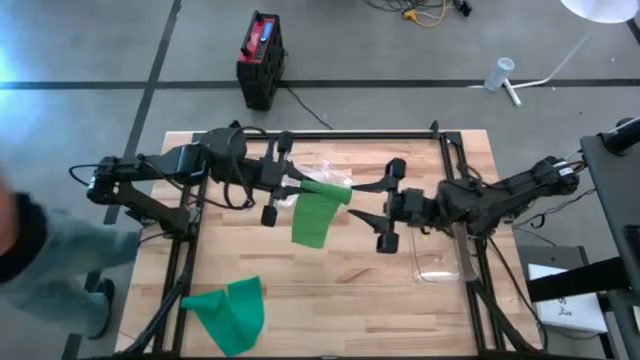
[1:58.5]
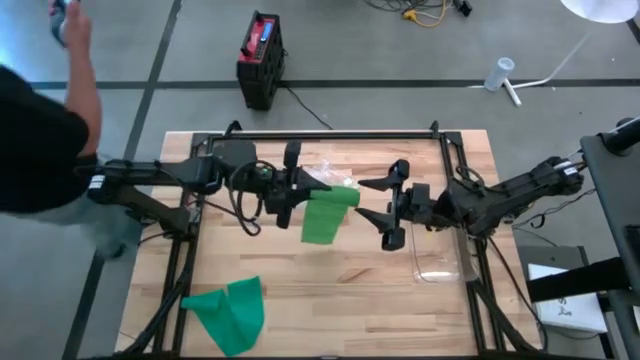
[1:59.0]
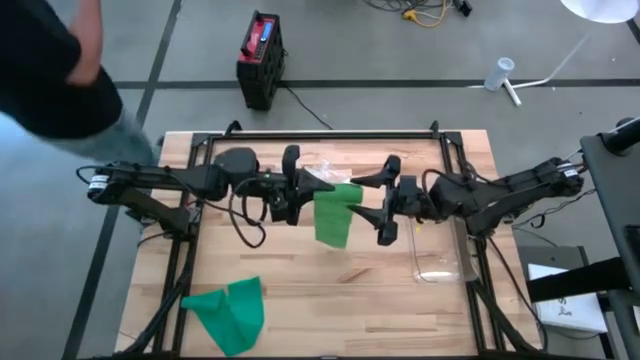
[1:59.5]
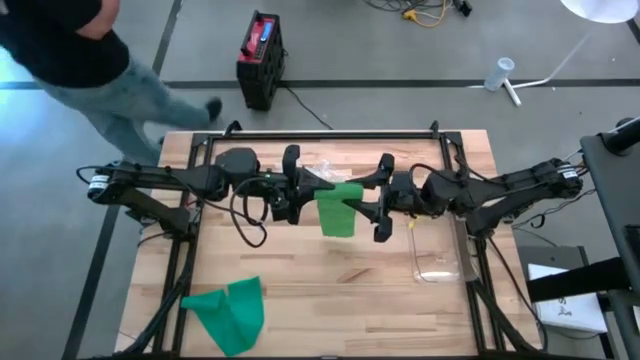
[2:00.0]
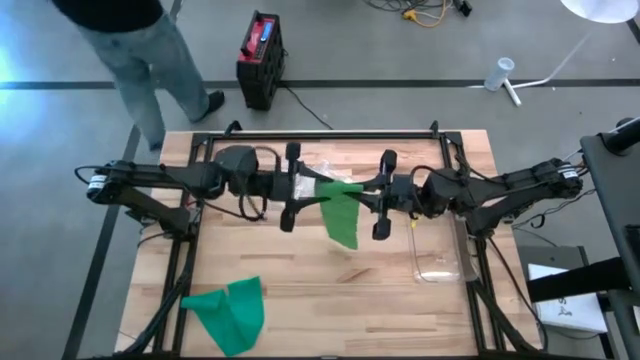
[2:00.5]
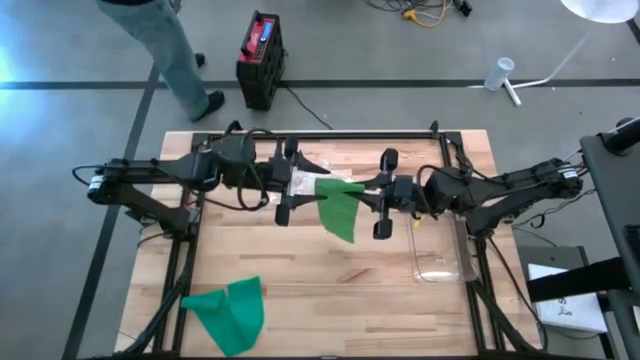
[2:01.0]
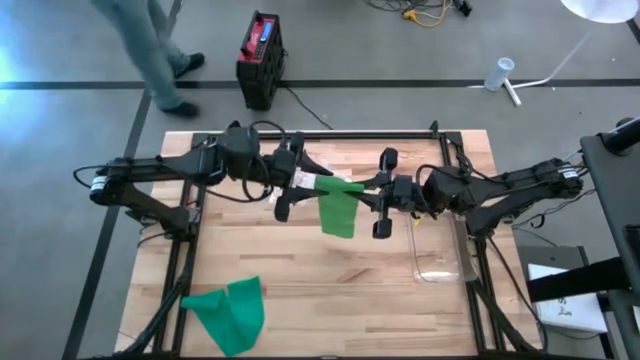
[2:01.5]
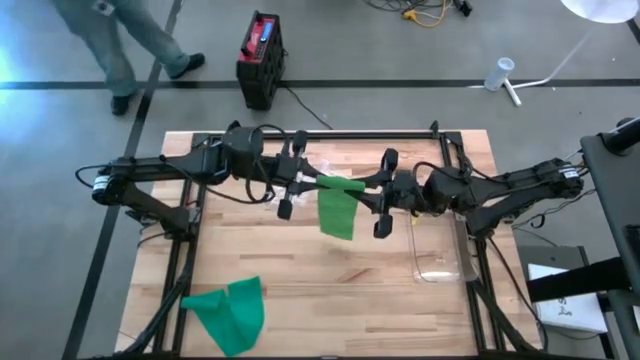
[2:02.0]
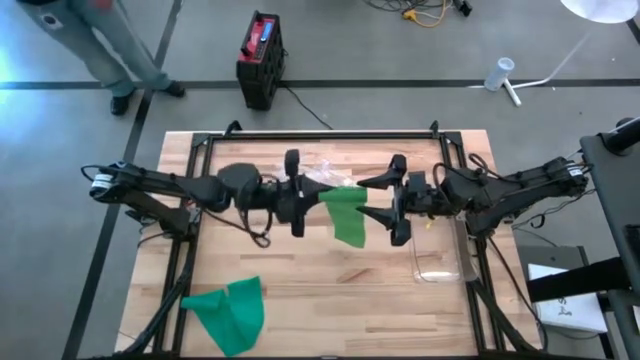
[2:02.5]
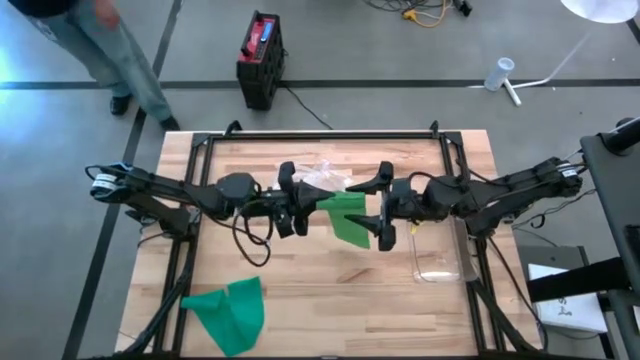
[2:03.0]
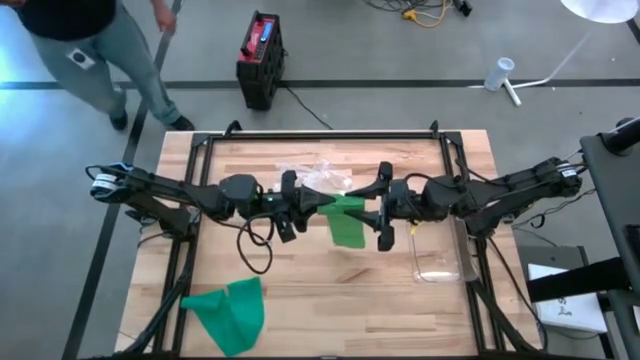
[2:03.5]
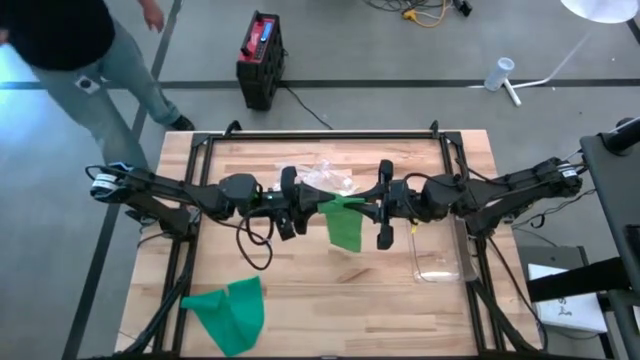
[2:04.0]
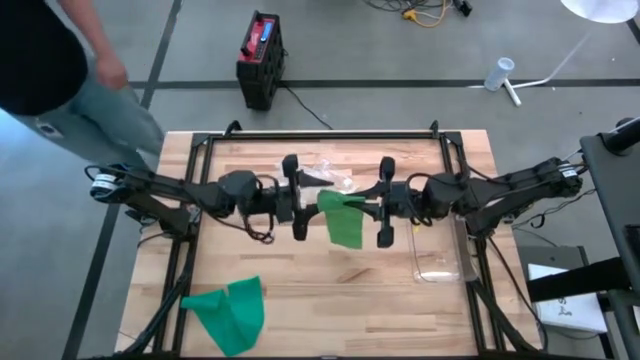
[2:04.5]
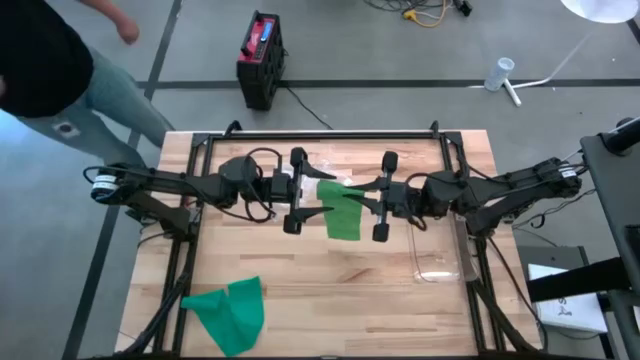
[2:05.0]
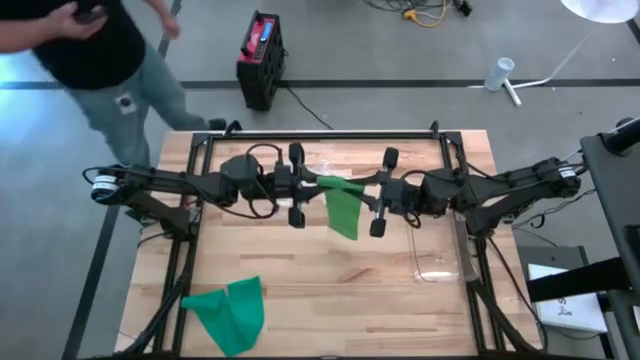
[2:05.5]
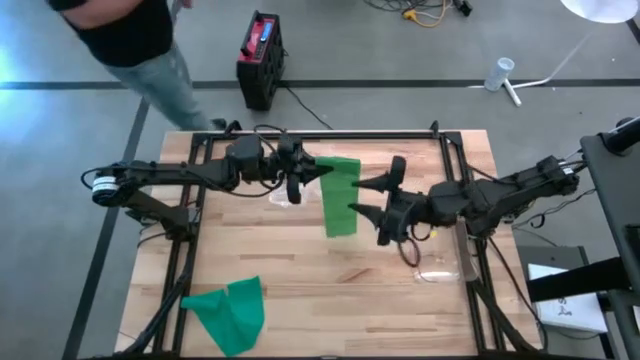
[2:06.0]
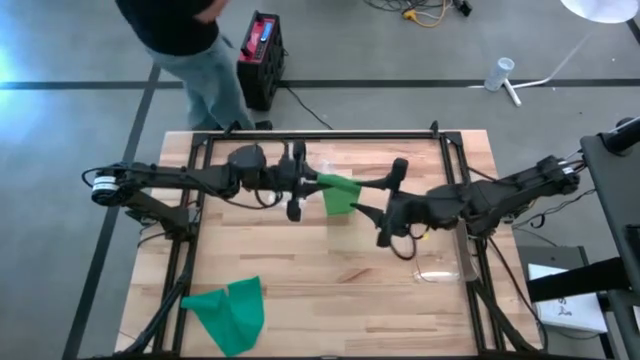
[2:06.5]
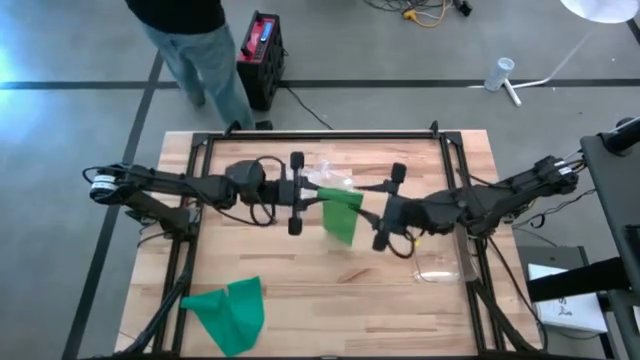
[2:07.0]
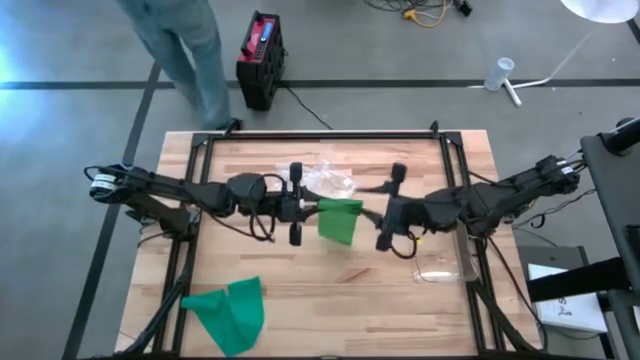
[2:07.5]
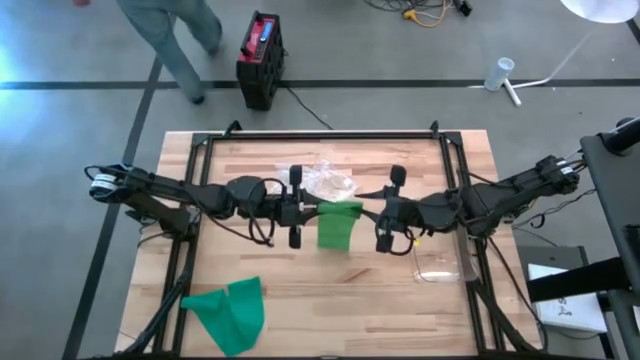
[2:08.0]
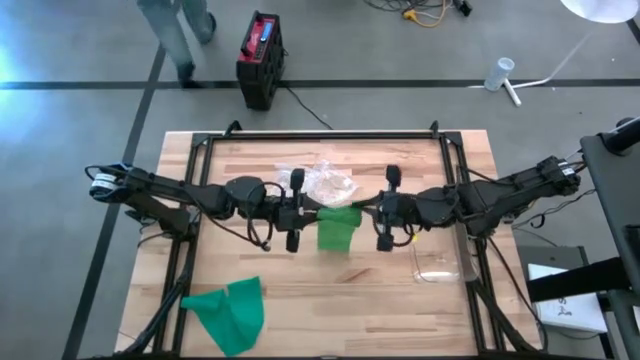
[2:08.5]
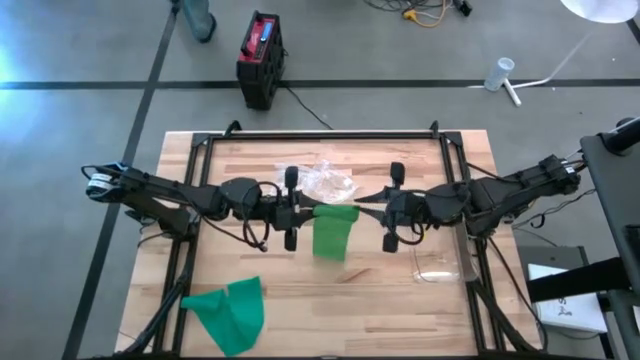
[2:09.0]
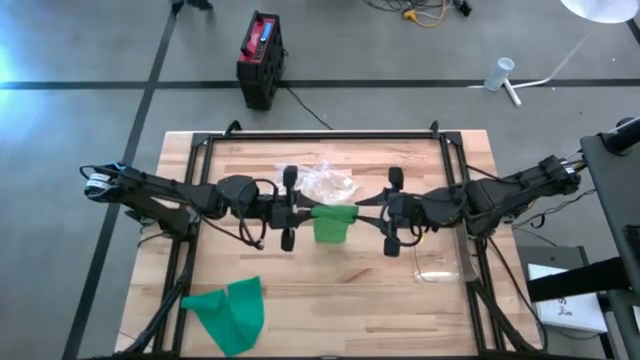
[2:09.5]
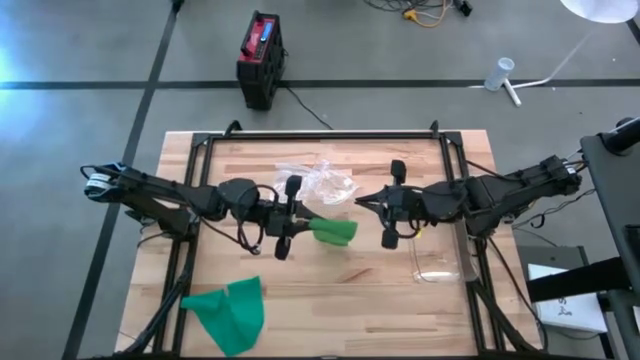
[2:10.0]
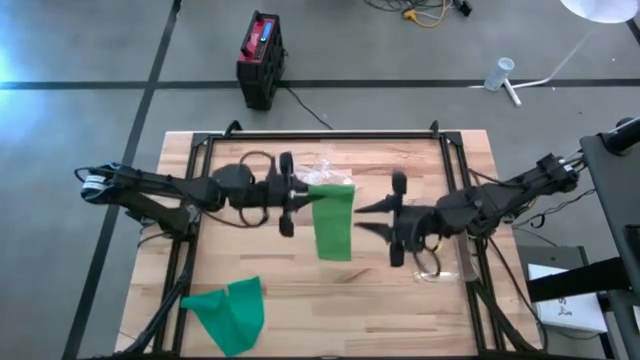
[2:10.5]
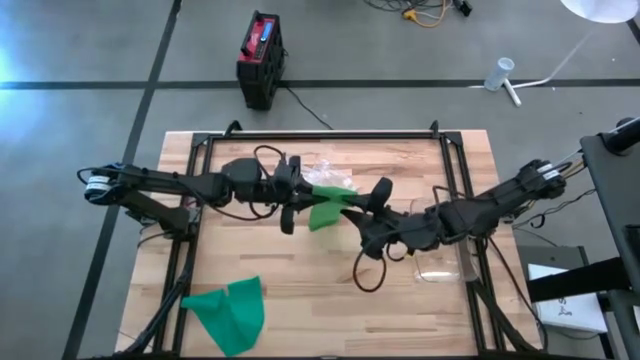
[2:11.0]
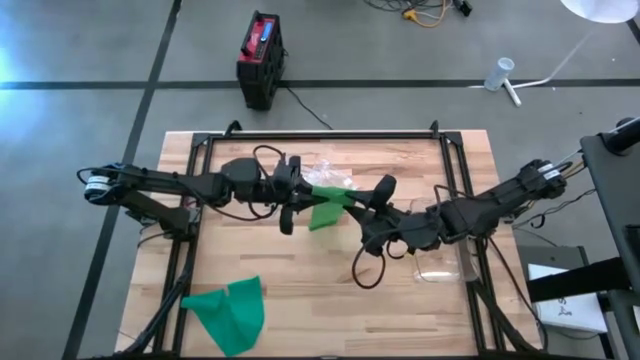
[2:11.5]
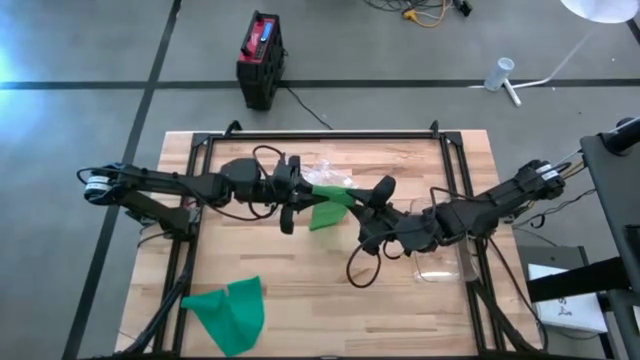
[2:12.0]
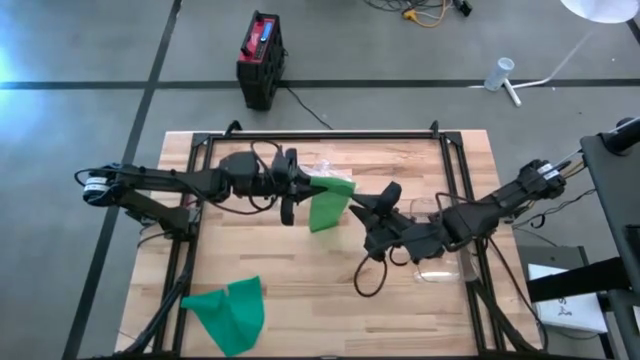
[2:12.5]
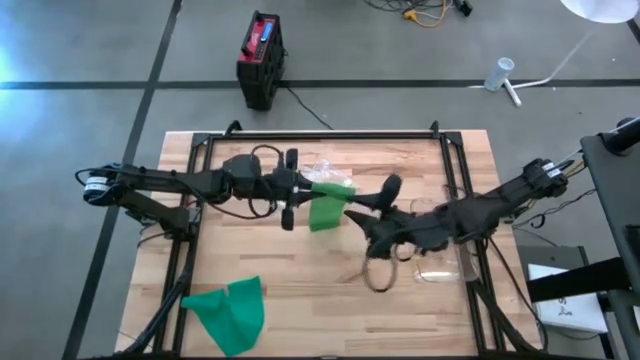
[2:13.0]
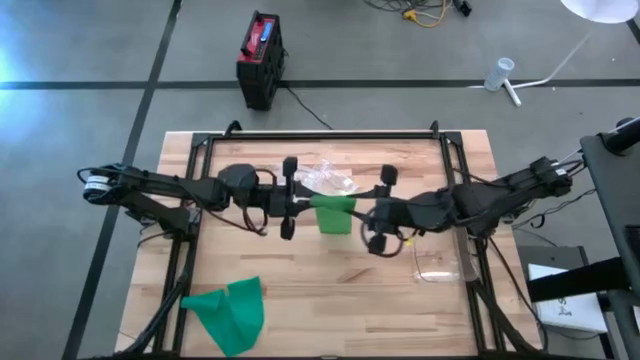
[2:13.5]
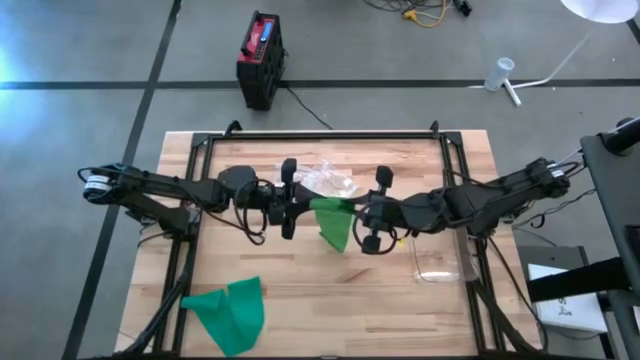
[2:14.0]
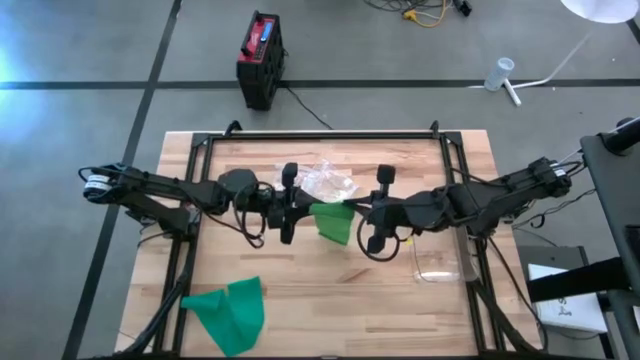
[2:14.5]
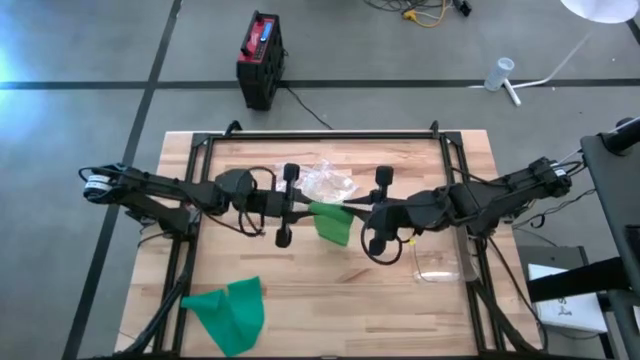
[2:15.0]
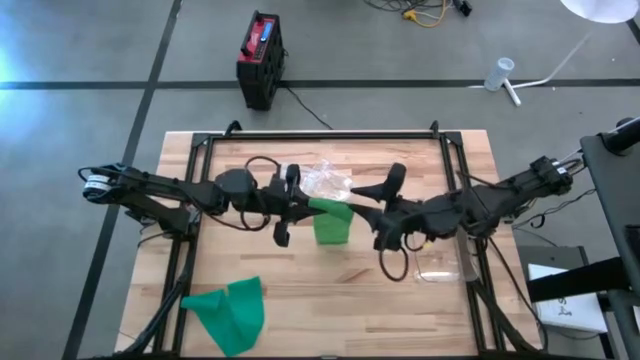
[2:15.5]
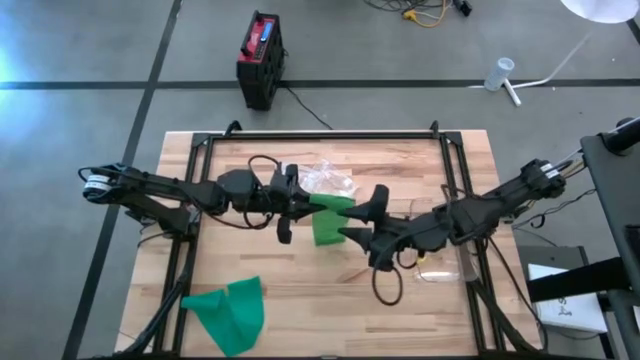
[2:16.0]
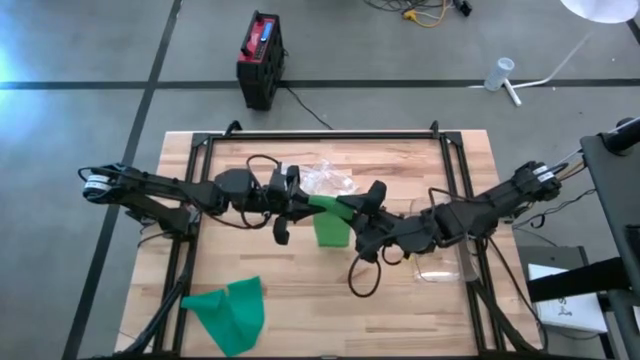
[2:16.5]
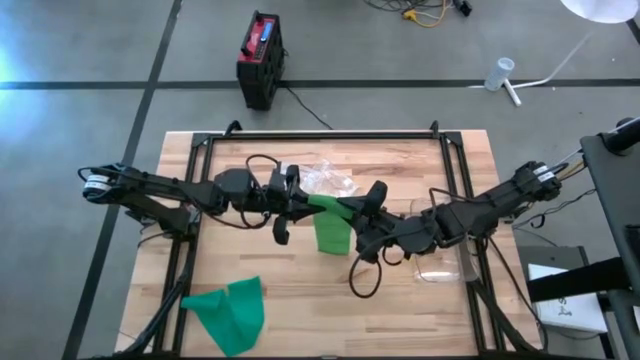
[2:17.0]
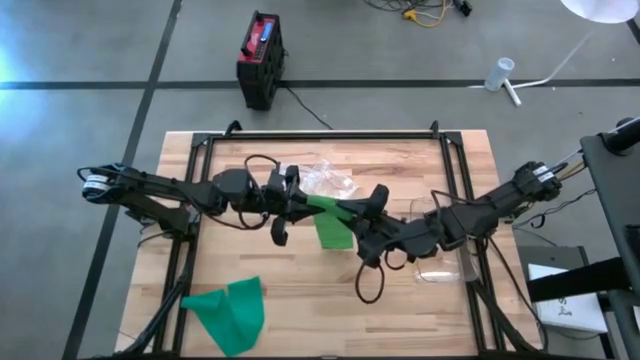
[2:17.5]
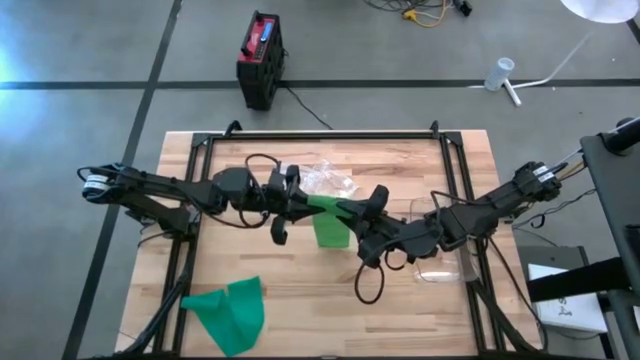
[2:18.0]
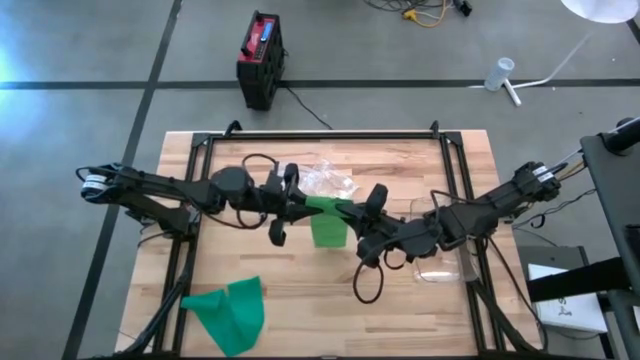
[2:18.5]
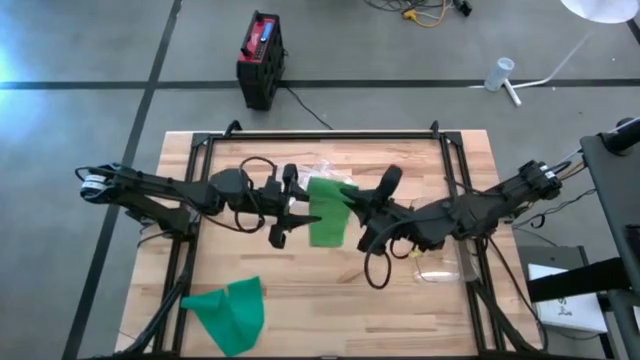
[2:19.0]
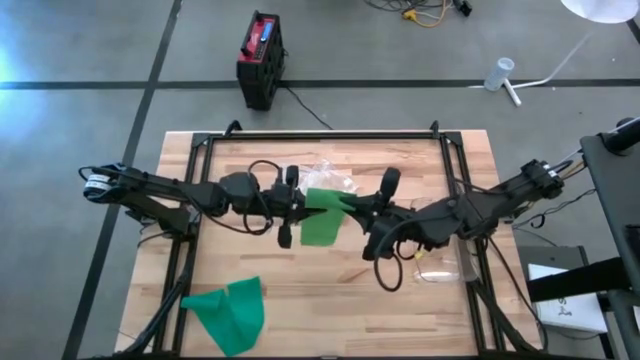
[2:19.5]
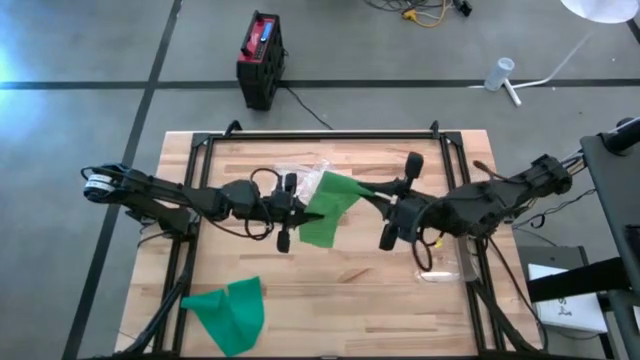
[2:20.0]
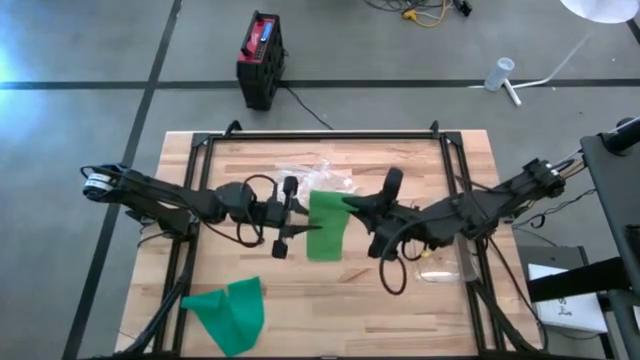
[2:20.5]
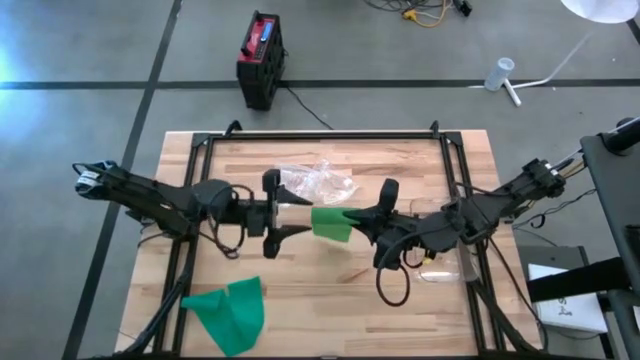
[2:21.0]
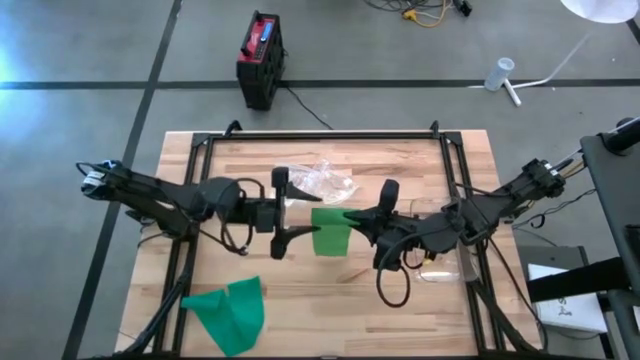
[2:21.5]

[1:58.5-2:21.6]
Task: Roll bandage
Roll the green bandage
